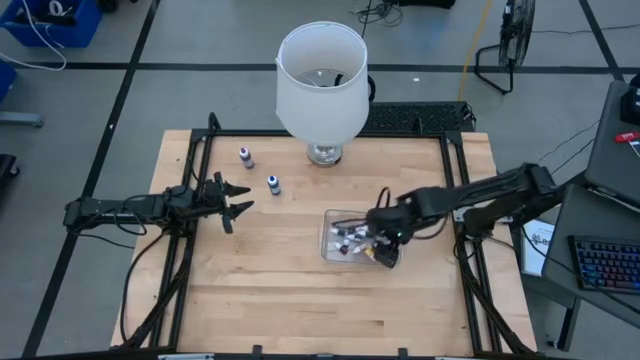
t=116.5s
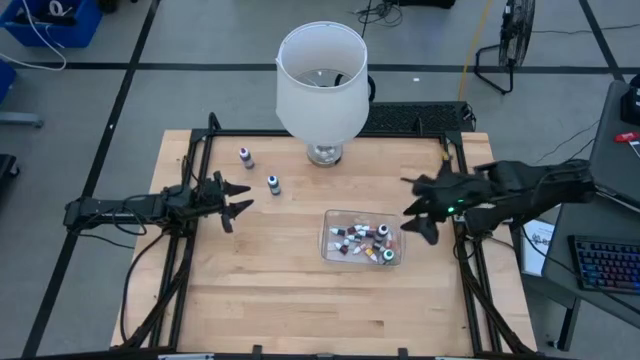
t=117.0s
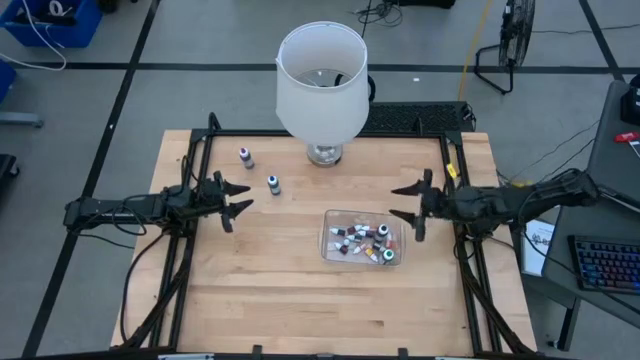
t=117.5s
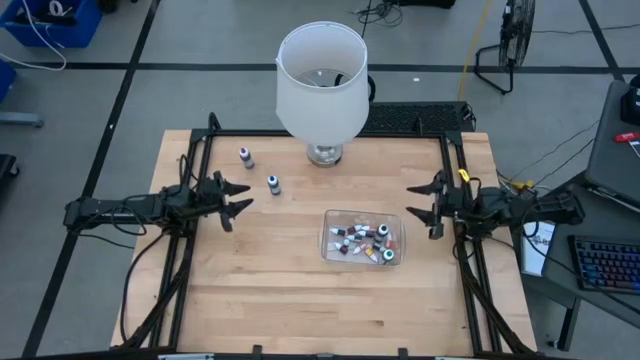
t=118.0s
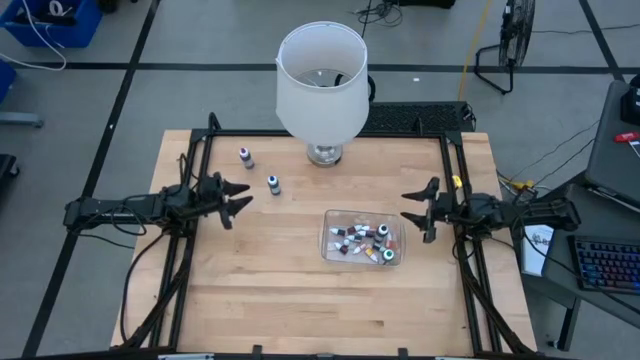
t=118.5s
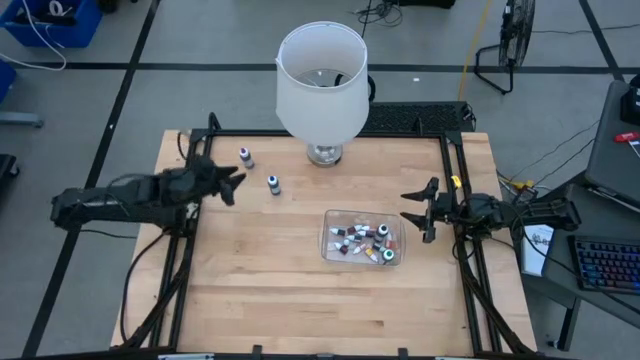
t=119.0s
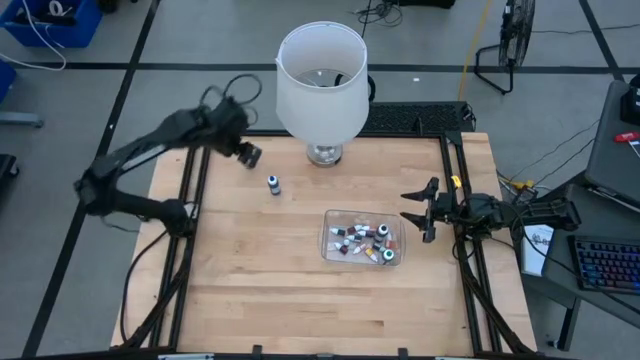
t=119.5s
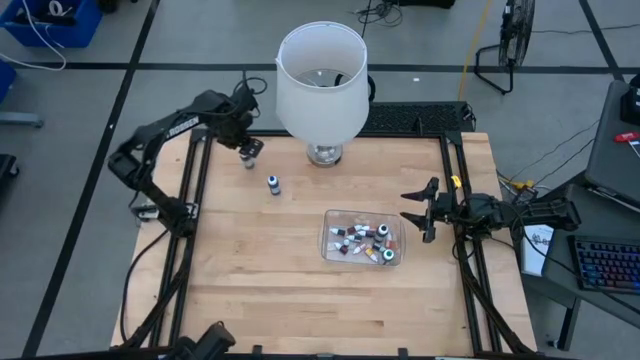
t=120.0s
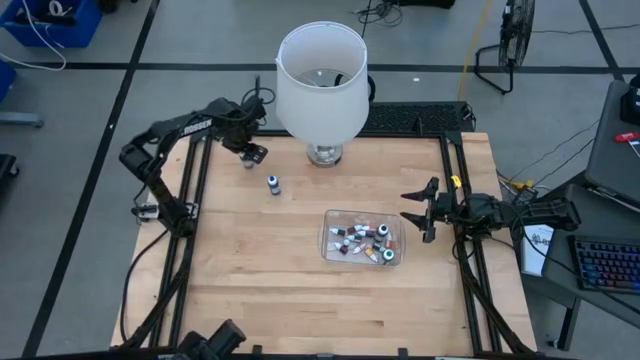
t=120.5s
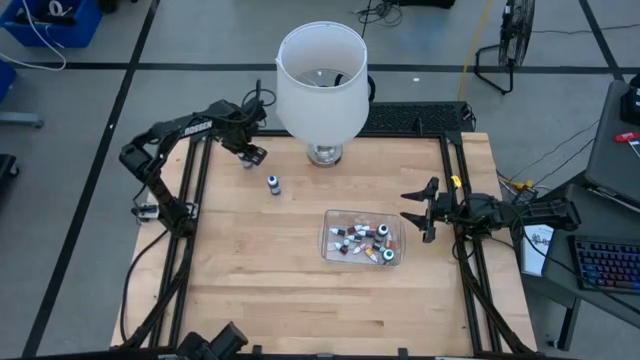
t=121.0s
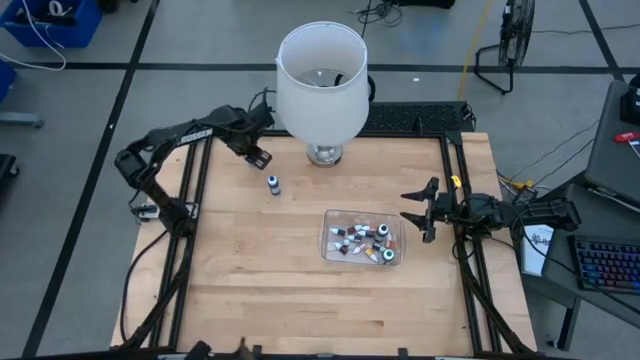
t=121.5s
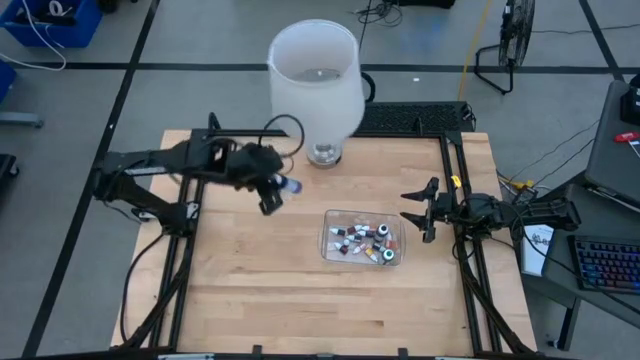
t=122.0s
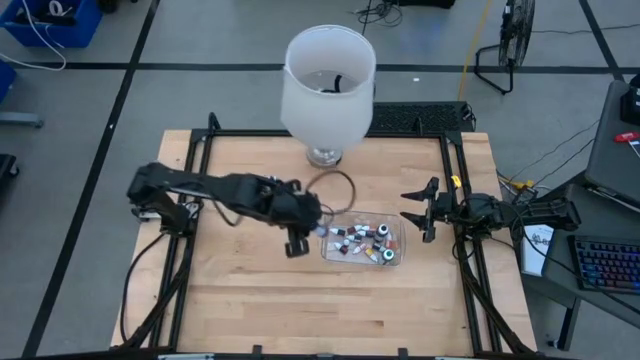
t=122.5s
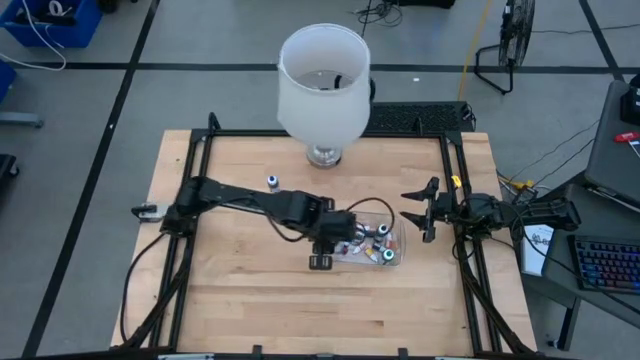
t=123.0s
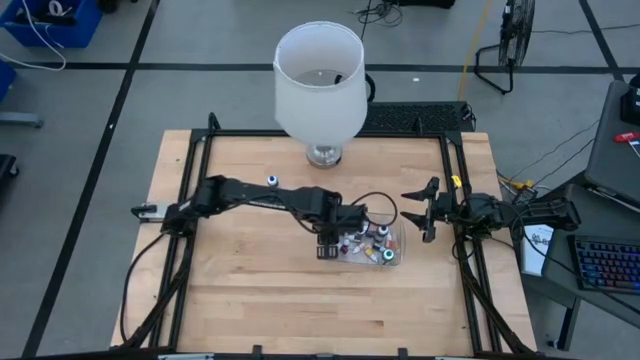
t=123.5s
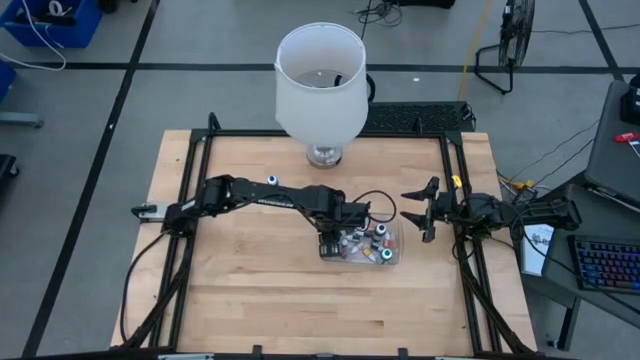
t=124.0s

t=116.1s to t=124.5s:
Task: Pick & Place food coloring
Put the large purple food coloring bottle into the transparent bin

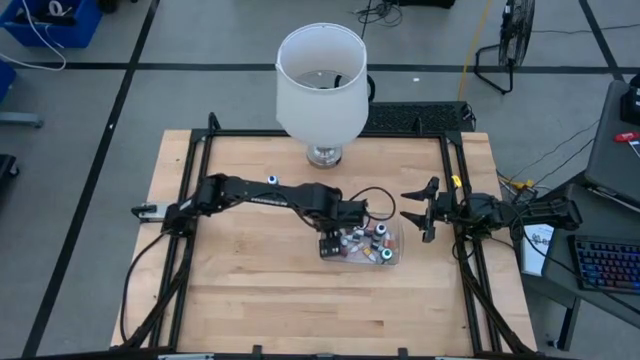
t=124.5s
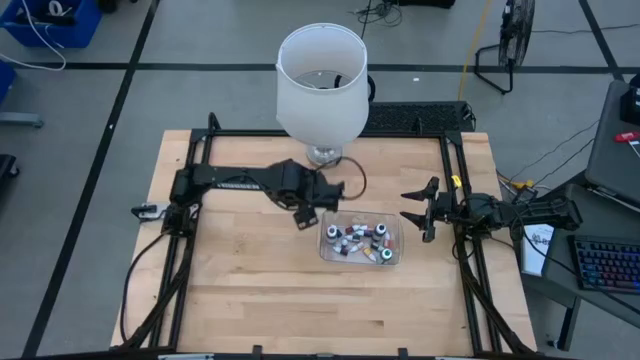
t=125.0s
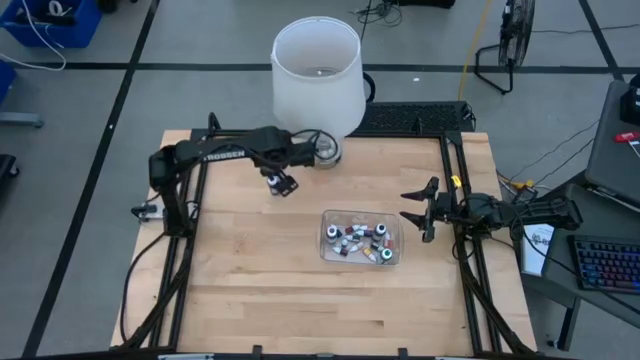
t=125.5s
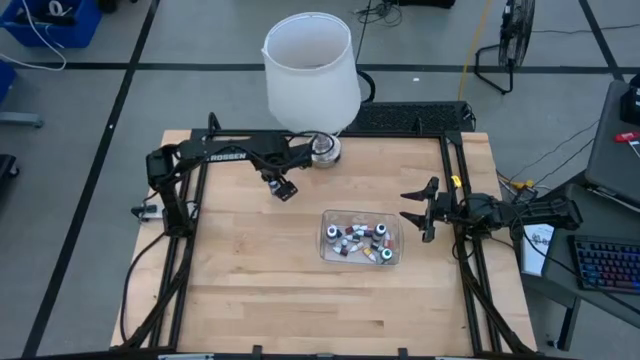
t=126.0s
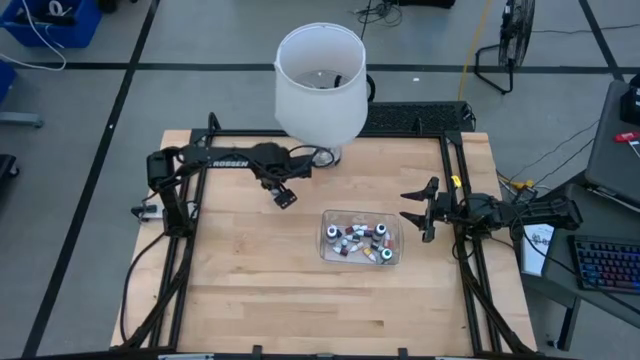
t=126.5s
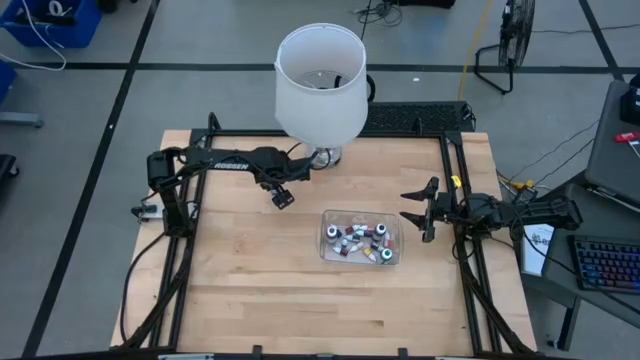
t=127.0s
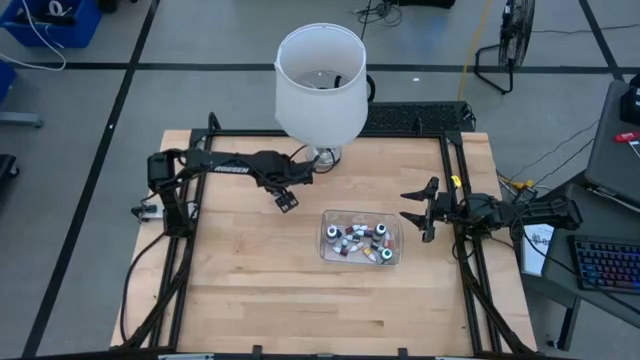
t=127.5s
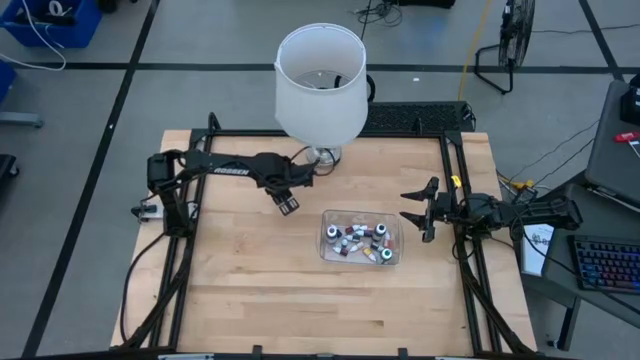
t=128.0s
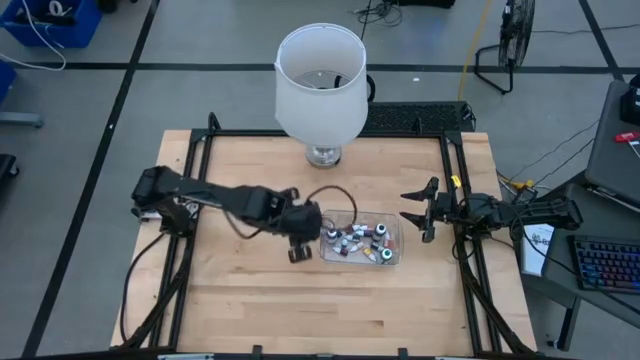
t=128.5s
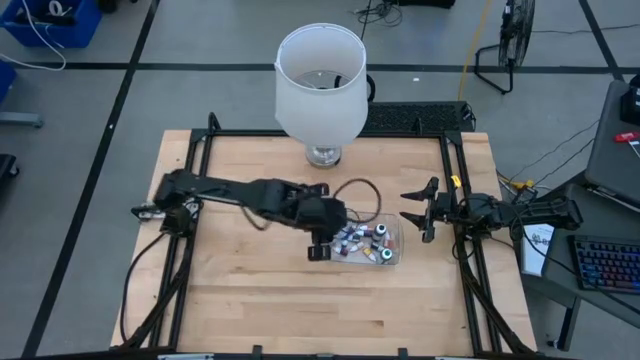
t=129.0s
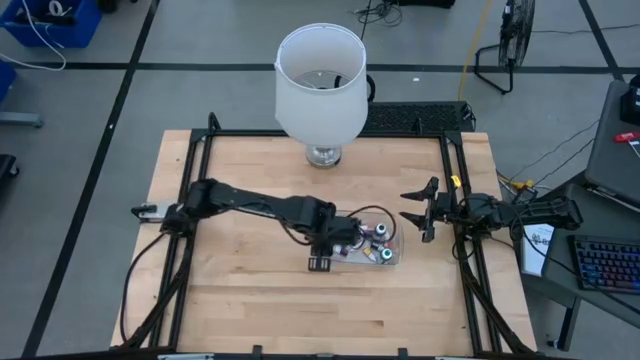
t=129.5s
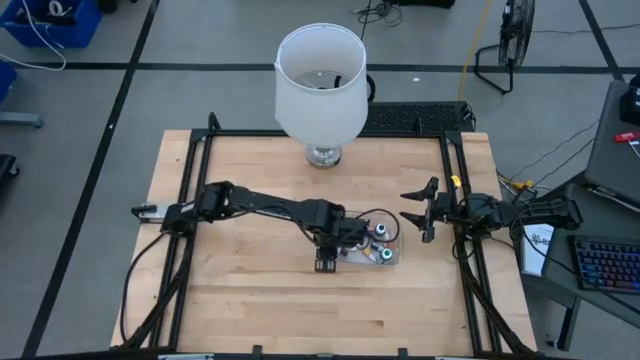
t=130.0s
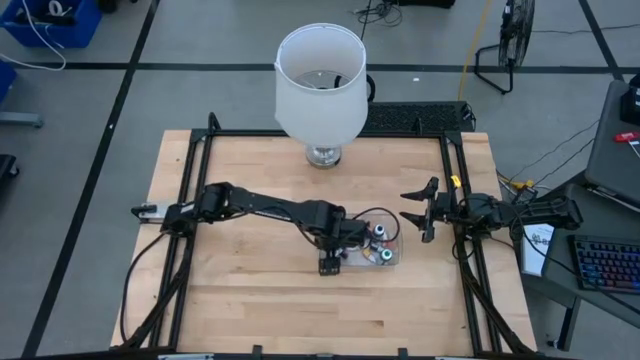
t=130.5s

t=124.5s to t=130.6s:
Put the large blue food coloring bottle into the transparent bin

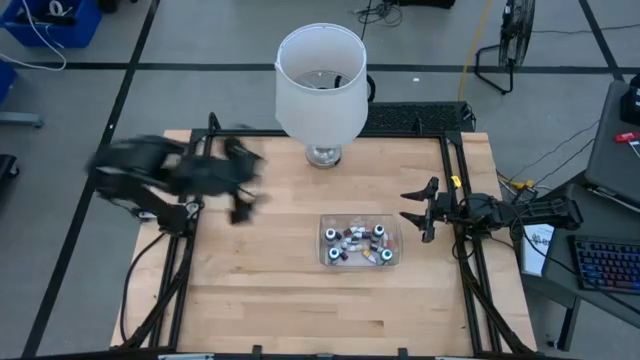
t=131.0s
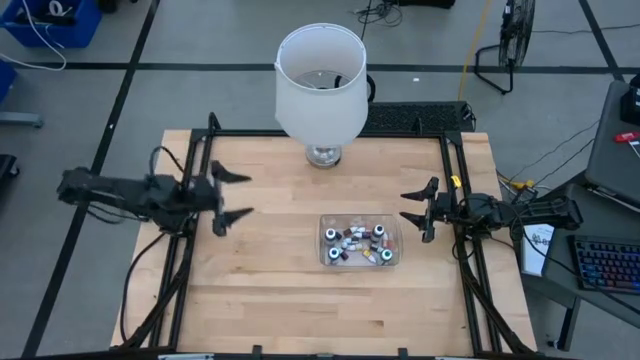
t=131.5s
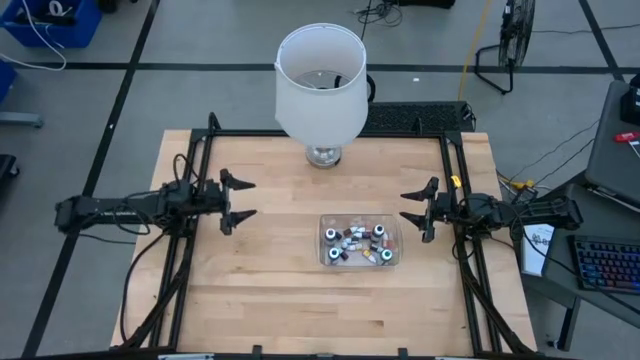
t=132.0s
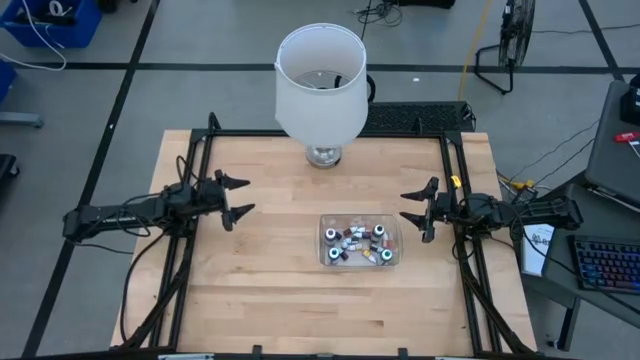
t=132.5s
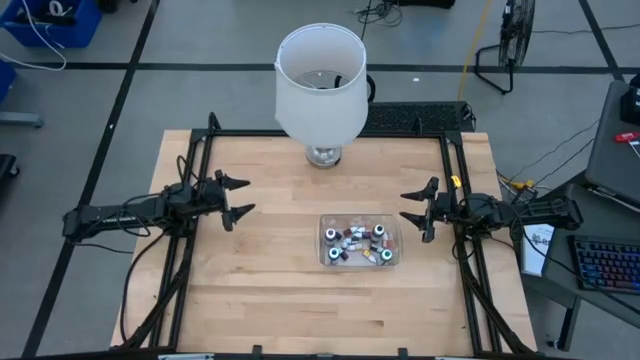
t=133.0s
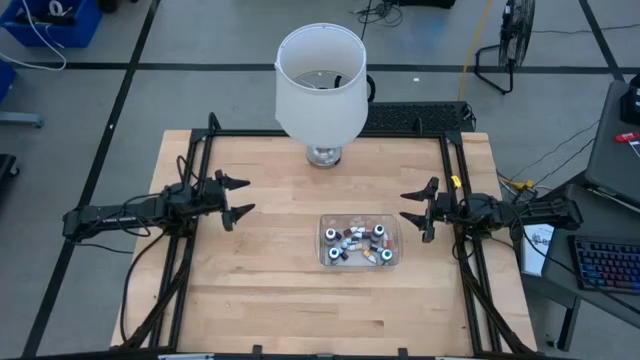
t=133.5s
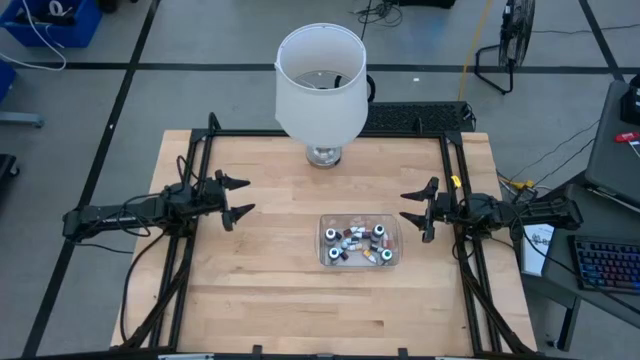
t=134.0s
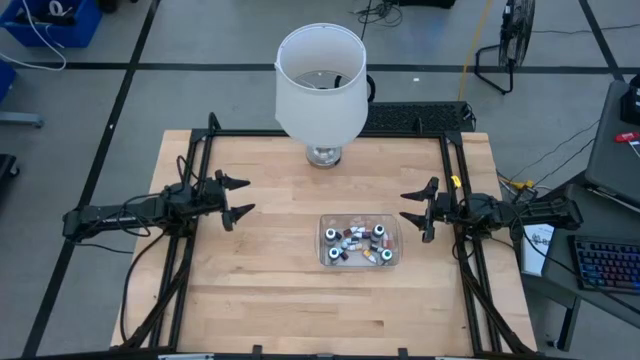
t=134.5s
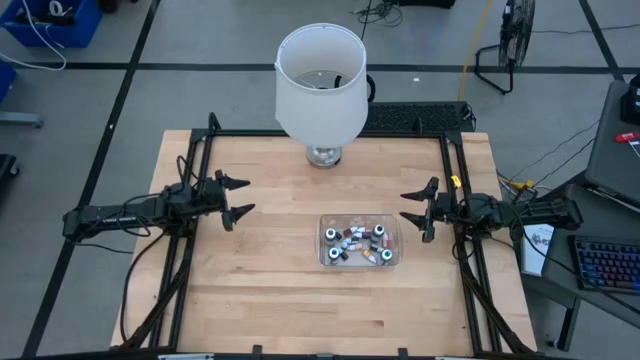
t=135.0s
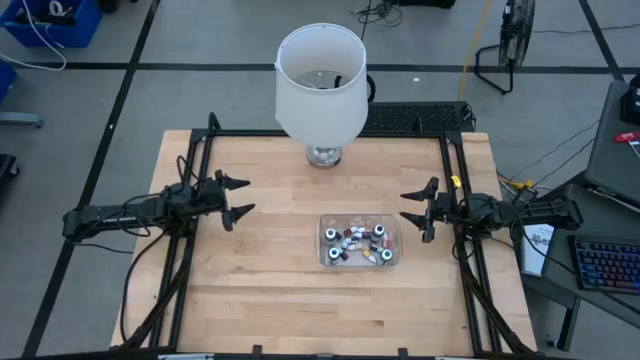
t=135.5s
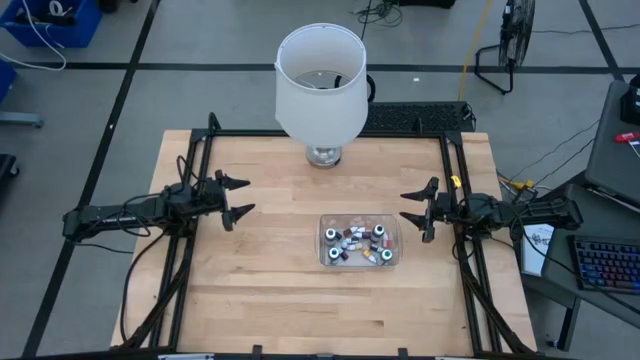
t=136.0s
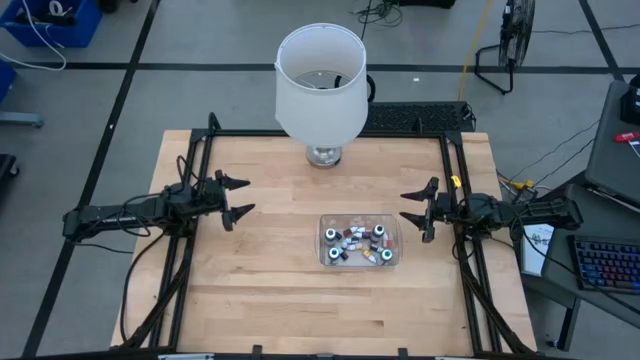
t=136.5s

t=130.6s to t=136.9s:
Return to Home Position

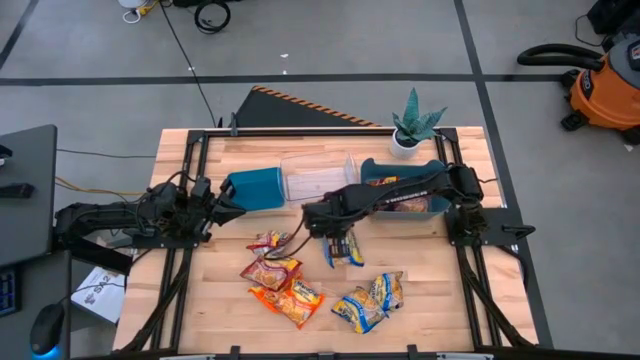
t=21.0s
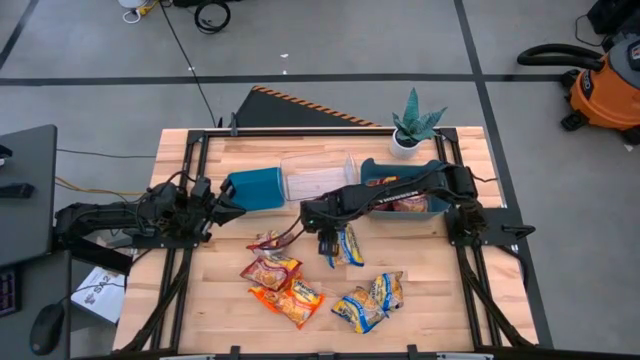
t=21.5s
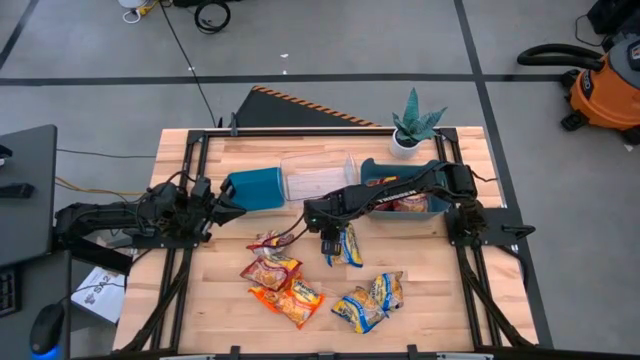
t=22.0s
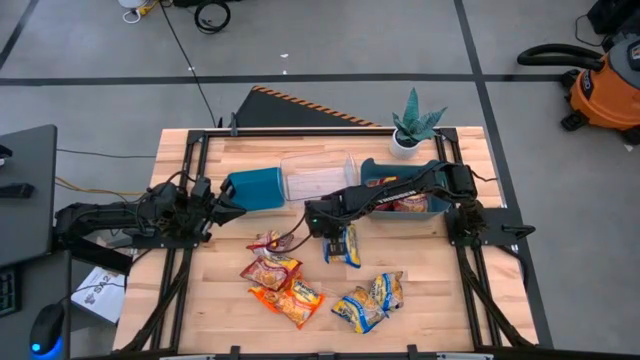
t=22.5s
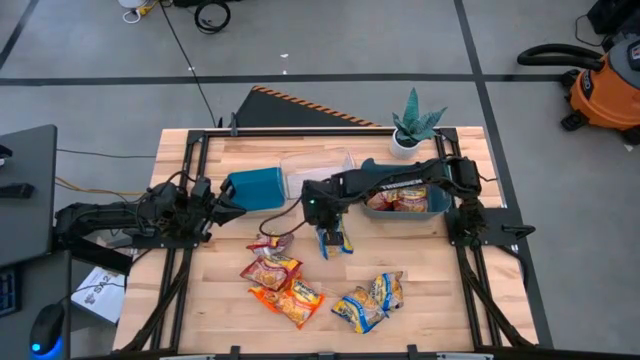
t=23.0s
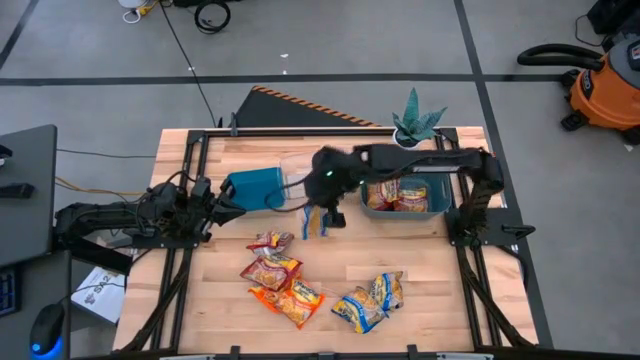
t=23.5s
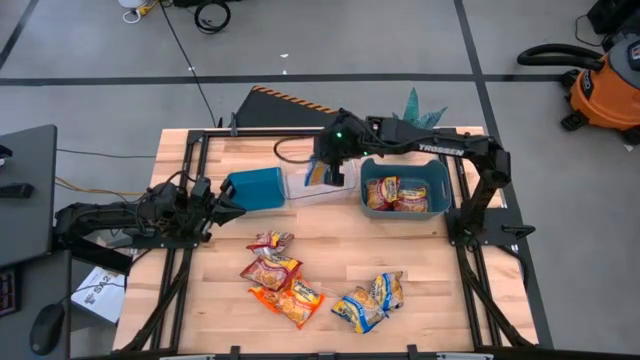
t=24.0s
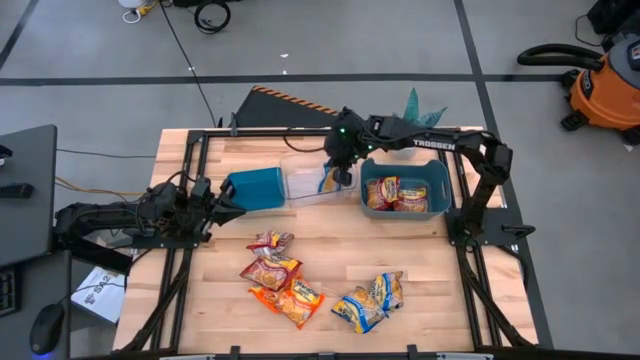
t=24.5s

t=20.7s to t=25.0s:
Task: Sort Maruchan noodles
Put the top blue noddle pack into the transparent shelf
